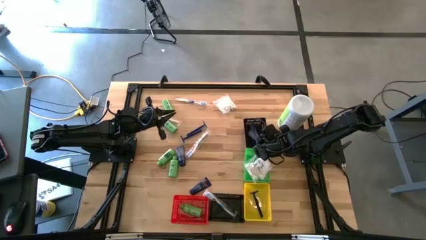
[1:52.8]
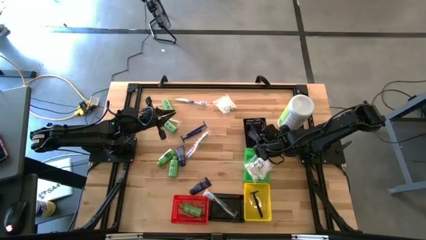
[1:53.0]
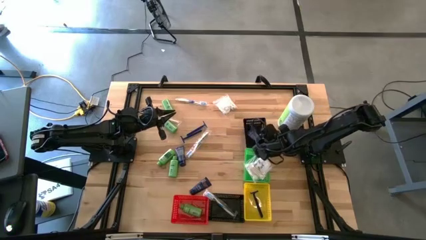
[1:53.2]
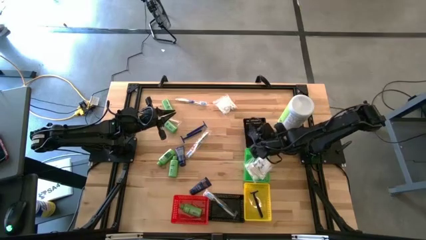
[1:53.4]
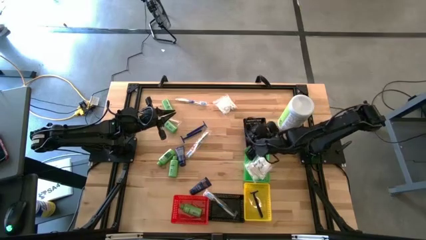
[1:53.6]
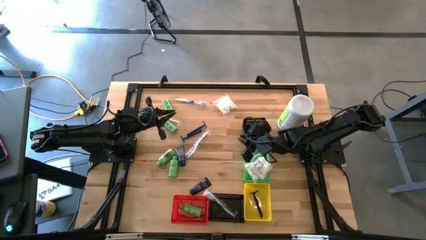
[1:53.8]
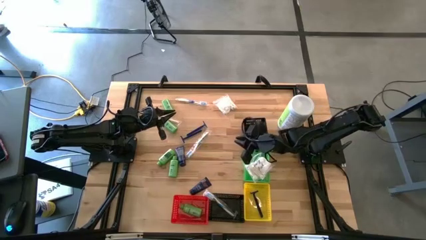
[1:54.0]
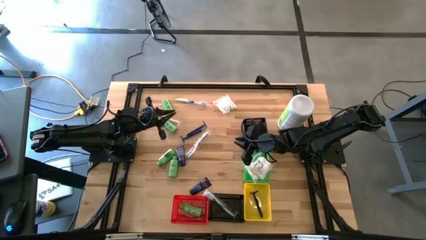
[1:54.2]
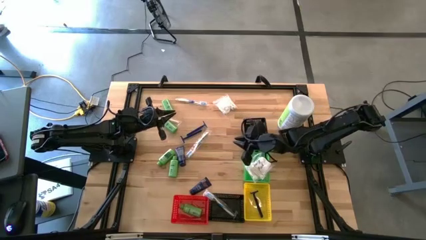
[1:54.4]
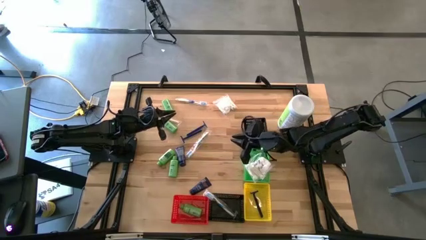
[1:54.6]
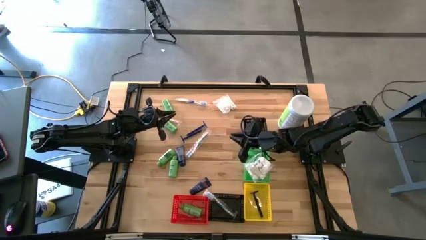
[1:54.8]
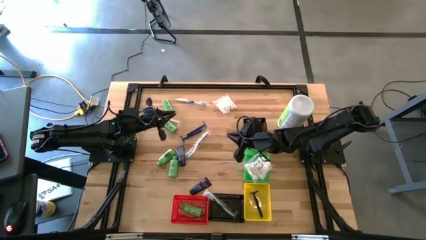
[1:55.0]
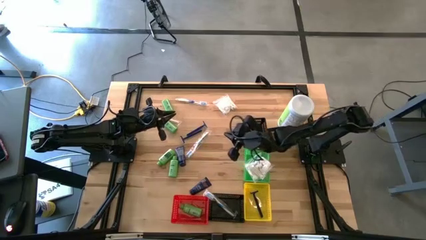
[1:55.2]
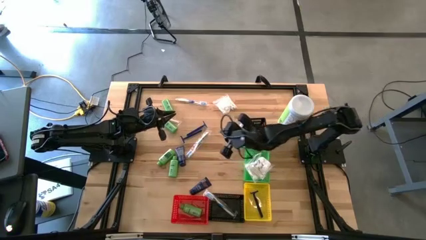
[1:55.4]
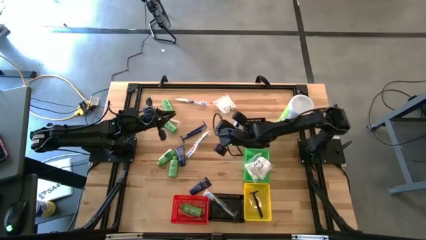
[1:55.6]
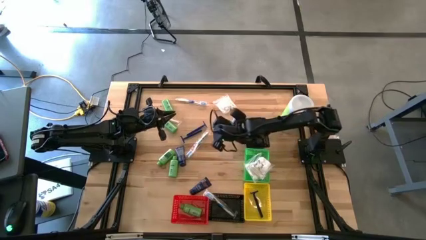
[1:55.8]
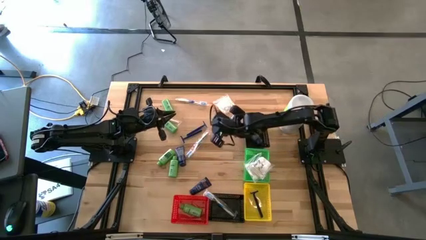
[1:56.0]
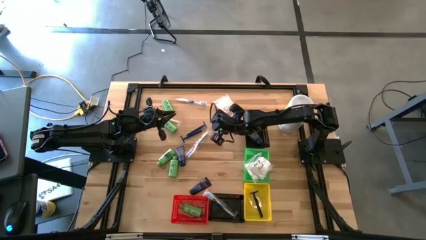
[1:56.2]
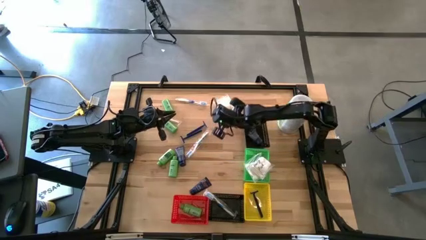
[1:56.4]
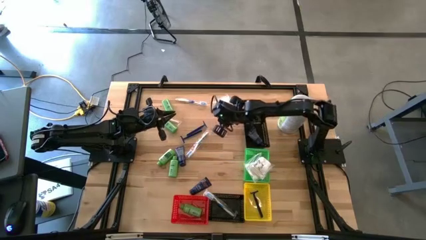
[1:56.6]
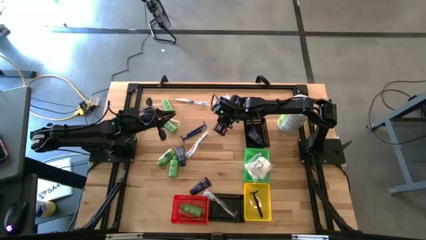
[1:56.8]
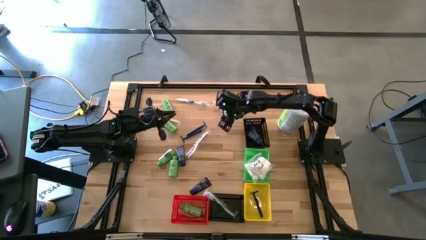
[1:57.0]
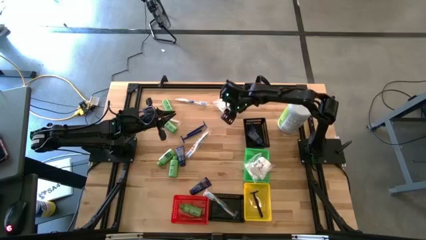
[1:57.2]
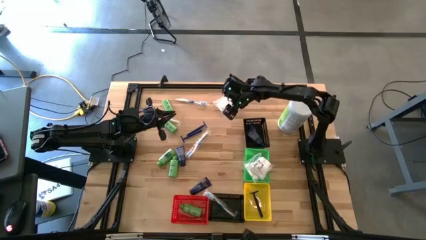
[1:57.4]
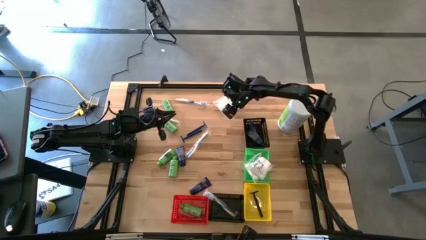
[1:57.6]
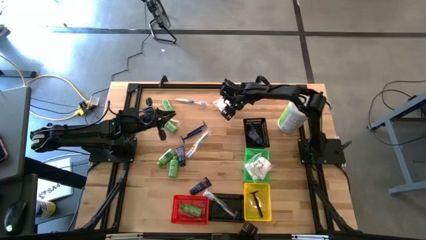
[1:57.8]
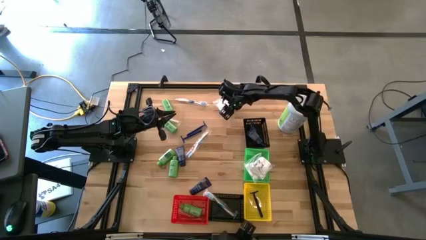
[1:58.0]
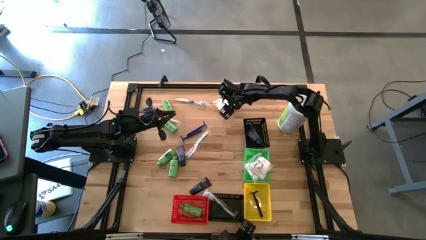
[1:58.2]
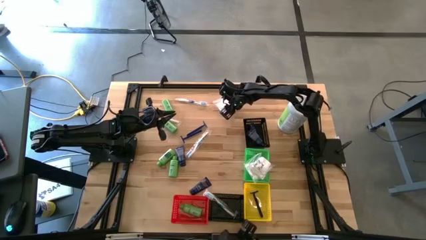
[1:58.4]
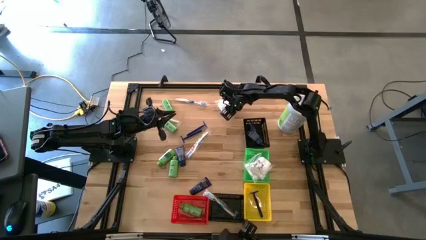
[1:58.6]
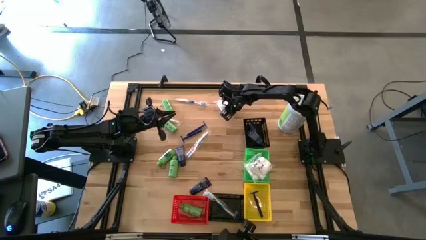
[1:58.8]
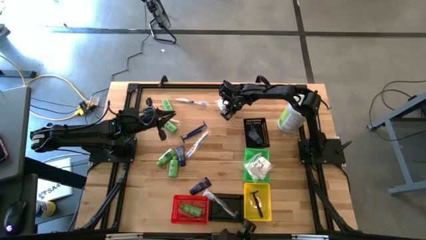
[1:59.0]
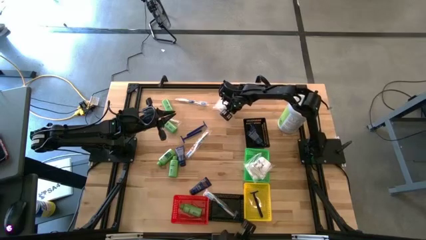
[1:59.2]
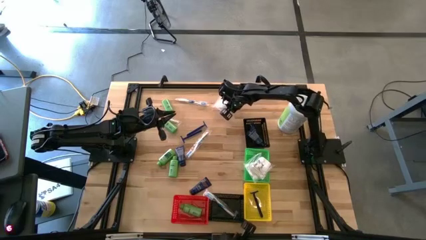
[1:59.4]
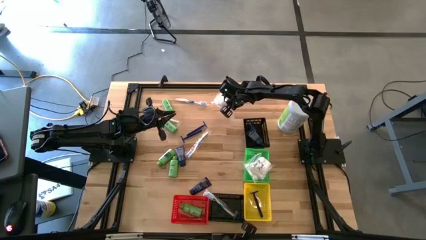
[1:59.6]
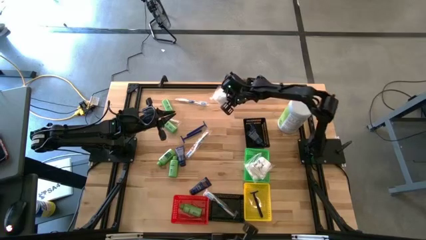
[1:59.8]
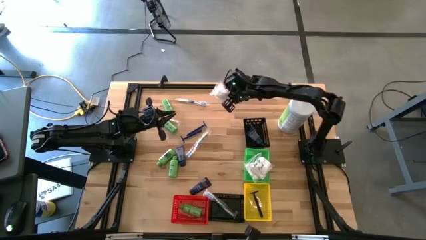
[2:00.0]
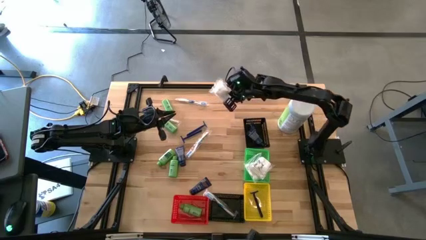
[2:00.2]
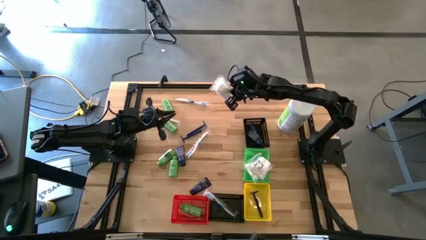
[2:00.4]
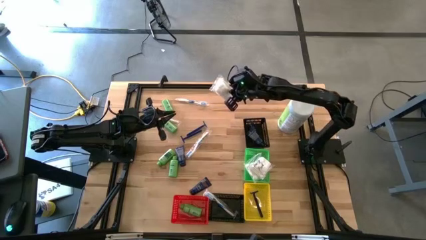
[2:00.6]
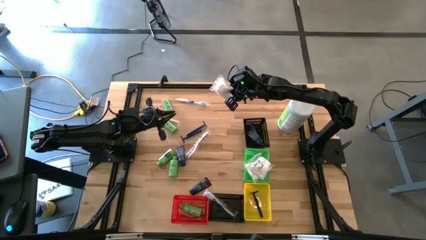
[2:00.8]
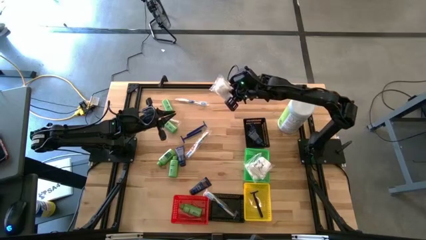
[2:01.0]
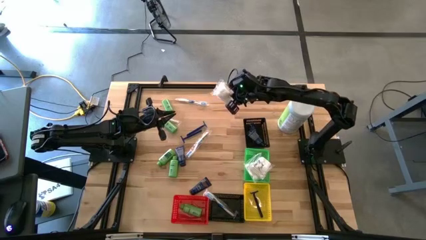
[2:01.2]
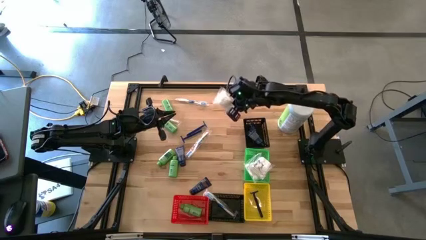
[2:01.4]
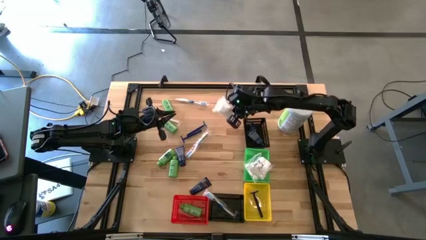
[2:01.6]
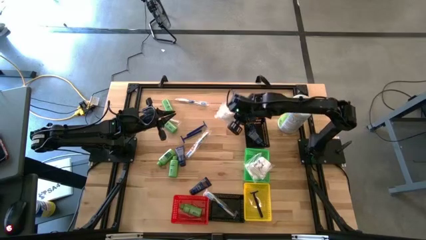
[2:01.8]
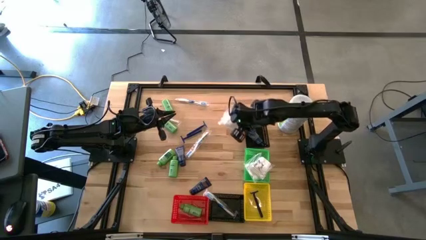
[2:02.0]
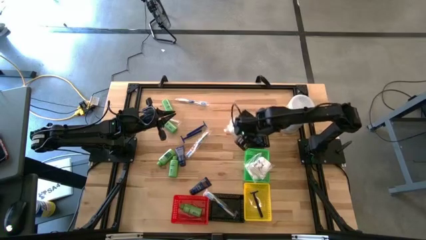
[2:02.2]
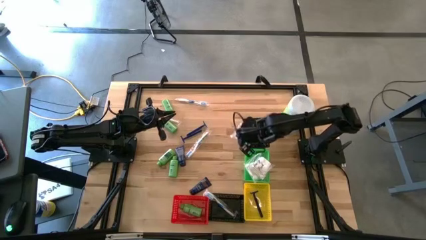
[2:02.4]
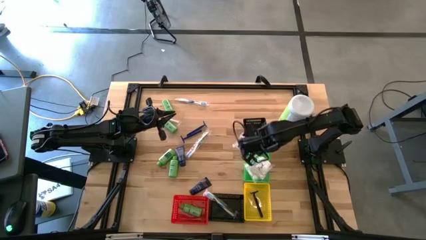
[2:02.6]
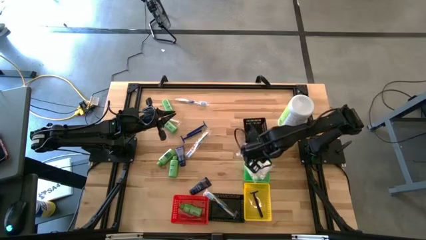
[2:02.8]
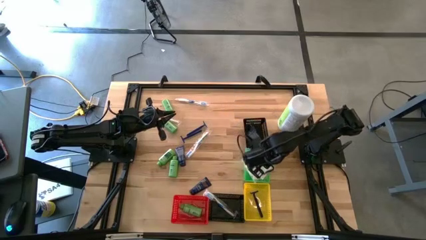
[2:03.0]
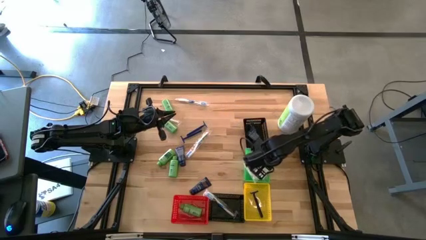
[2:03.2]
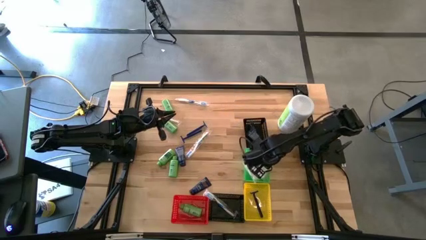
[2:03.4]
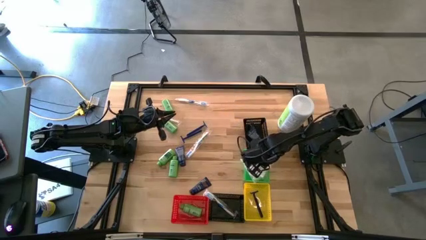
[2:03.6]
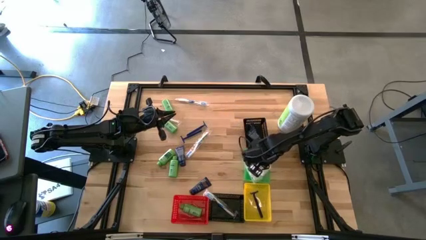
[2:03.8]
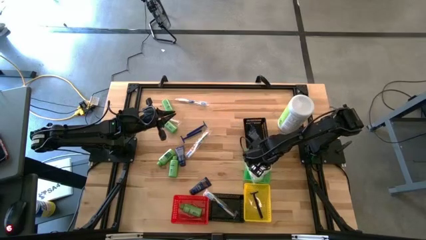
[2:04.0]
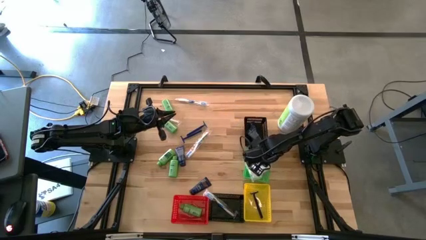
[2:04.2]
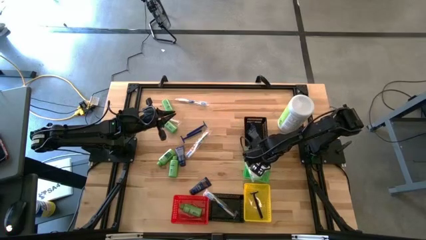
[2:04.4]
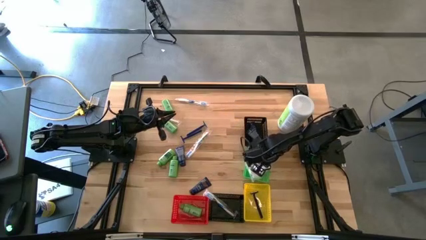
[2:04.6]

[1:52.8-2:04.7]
Task: Pick & Place Travel size toiletries
Put the cotton pack into the green bin

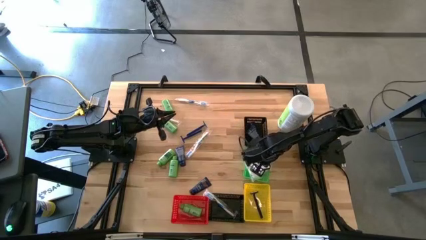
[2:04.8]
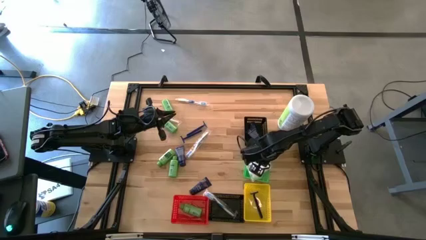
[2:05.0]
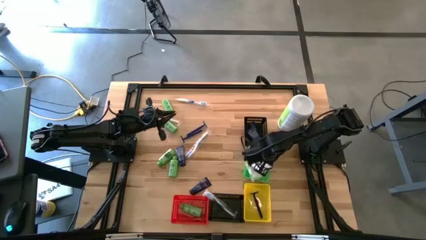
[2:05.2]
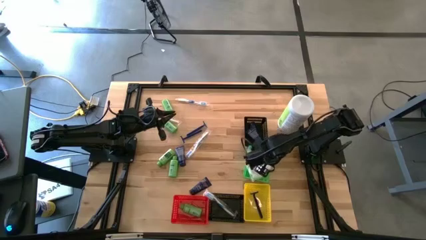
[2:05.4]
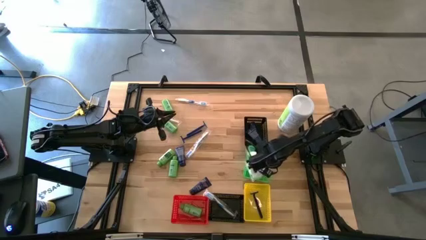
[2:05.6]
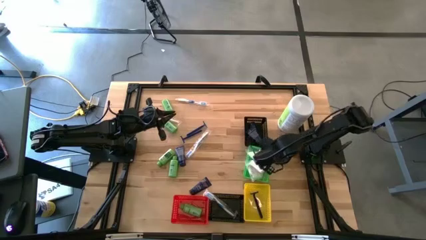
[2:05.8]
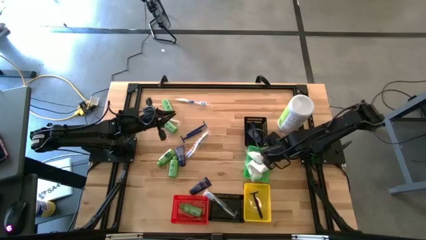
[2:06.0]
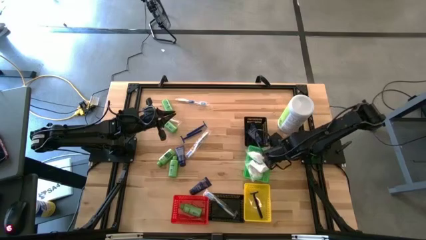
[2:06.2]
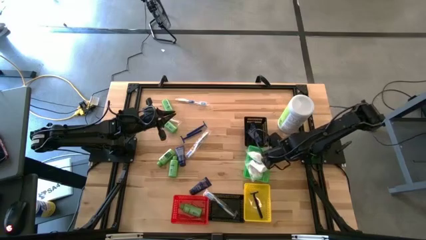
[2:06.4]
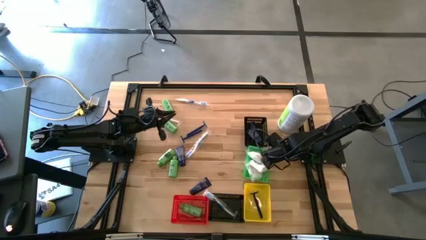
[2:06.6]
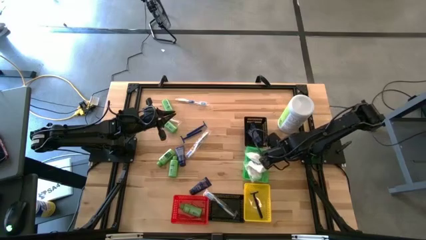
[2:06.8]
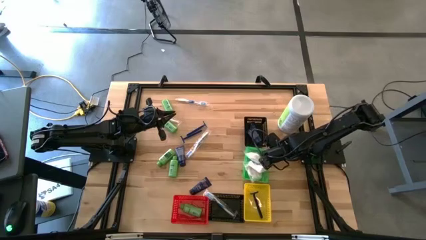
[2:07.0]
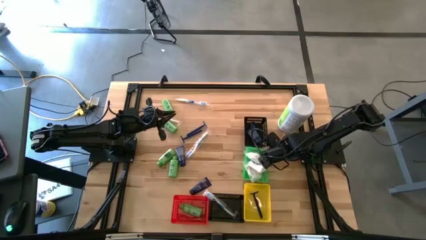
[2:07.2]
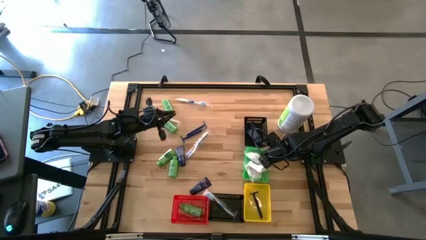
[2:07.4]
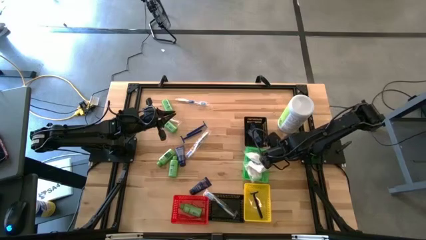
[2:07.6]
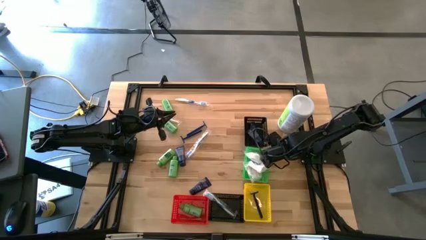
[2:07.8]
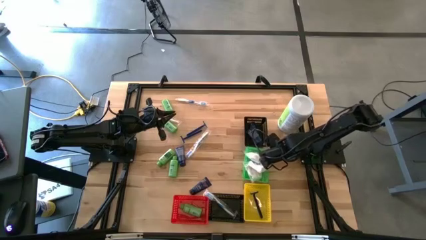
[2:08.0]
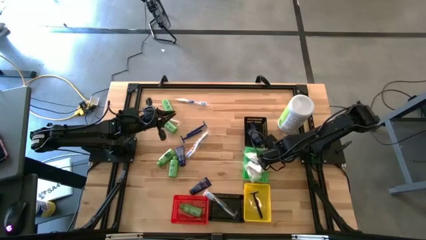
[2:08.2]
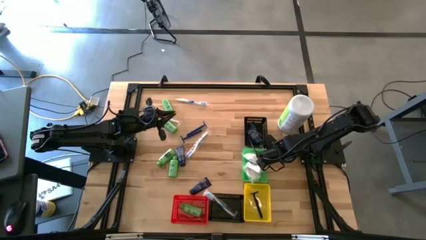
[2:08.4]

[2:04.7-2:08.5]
Adjust the green bin
